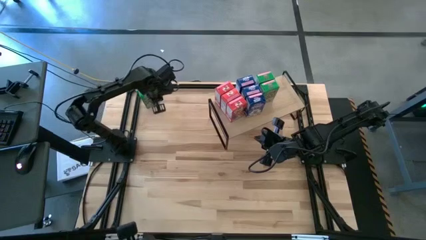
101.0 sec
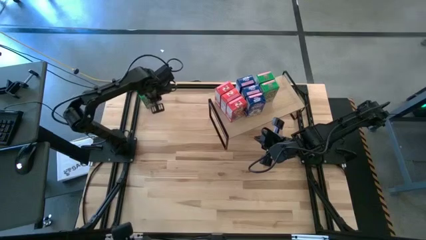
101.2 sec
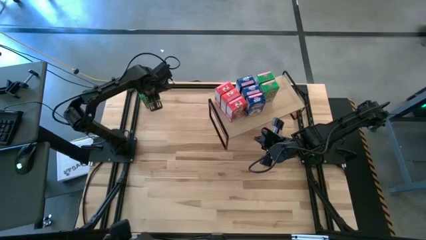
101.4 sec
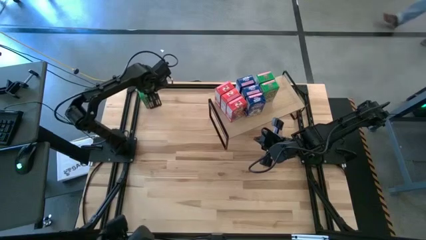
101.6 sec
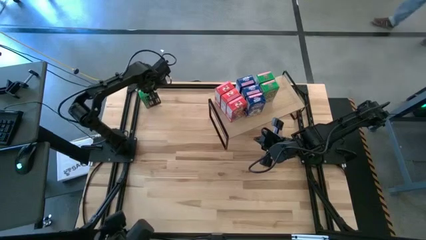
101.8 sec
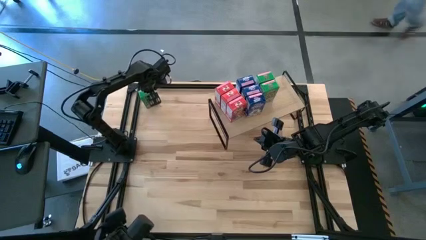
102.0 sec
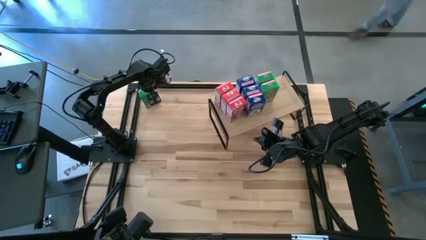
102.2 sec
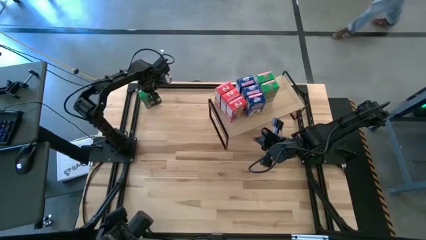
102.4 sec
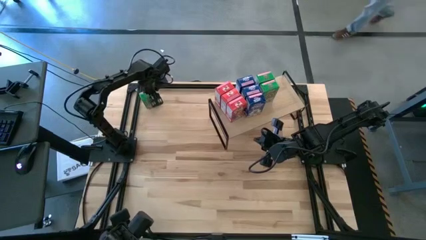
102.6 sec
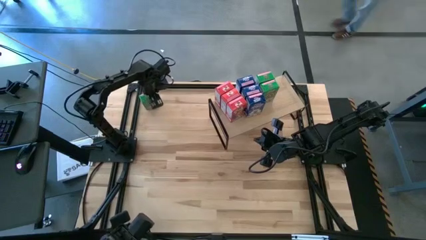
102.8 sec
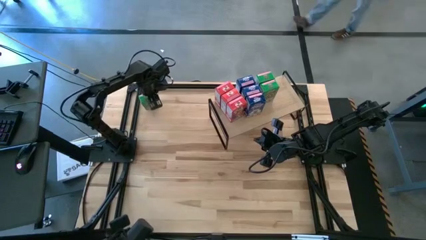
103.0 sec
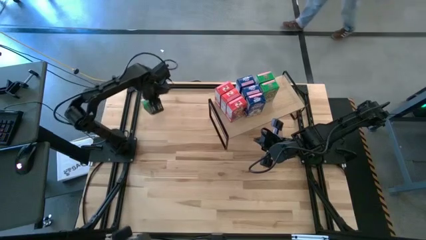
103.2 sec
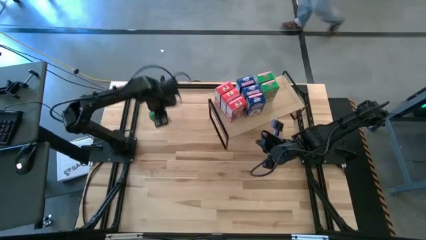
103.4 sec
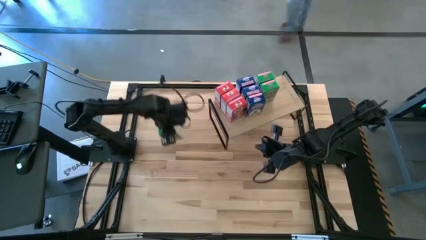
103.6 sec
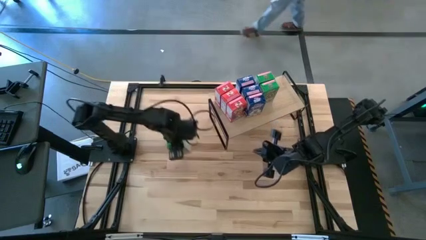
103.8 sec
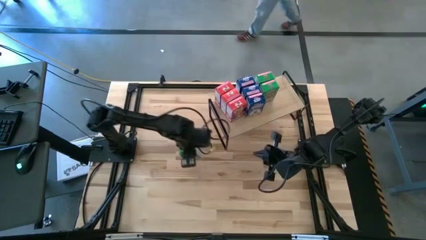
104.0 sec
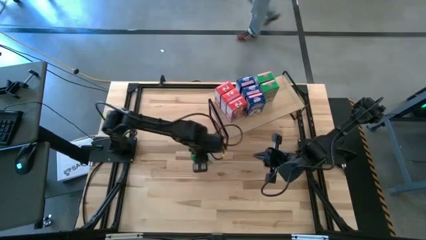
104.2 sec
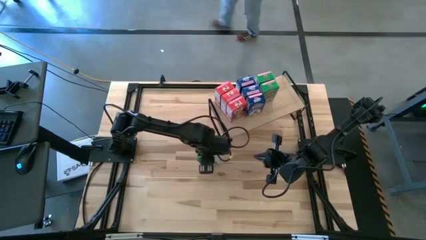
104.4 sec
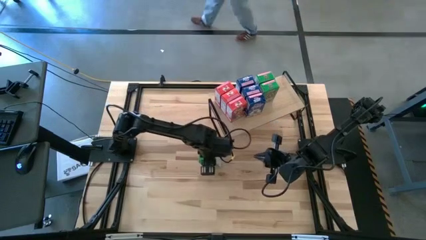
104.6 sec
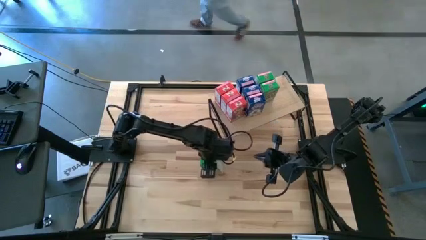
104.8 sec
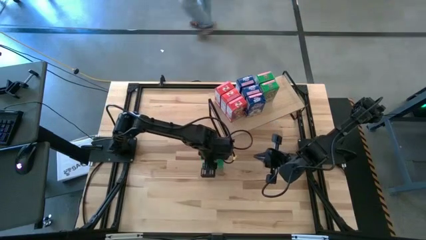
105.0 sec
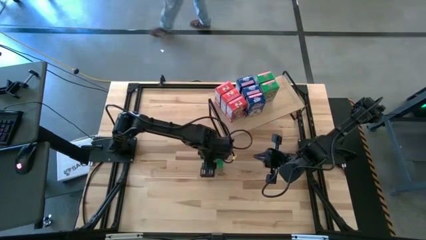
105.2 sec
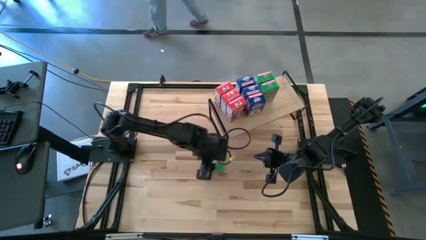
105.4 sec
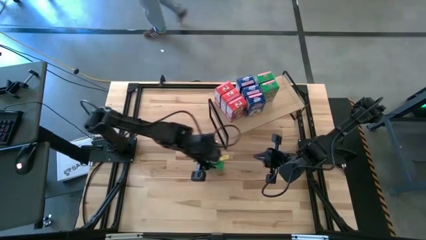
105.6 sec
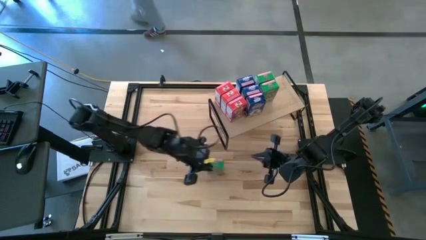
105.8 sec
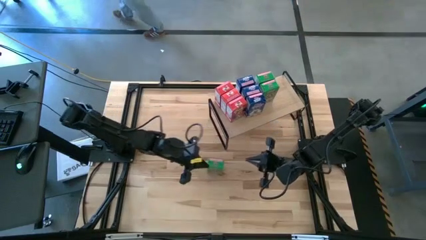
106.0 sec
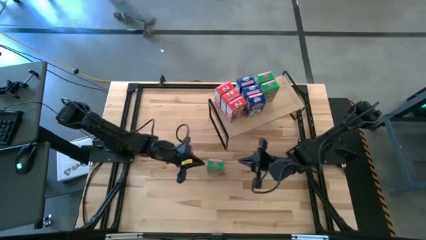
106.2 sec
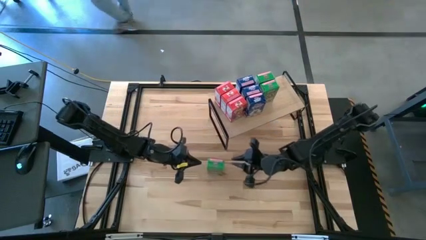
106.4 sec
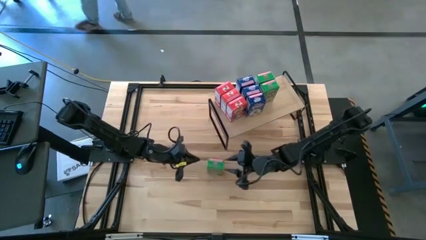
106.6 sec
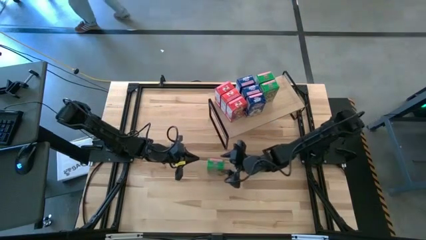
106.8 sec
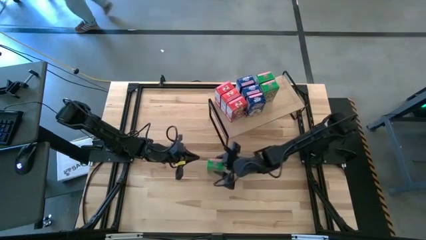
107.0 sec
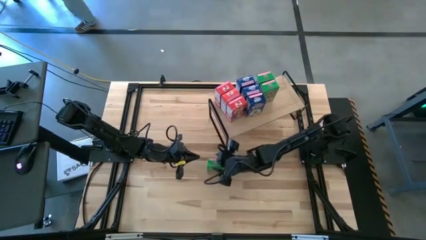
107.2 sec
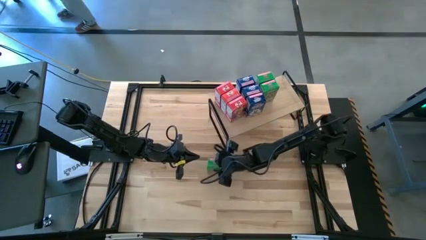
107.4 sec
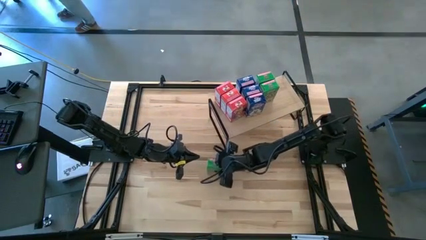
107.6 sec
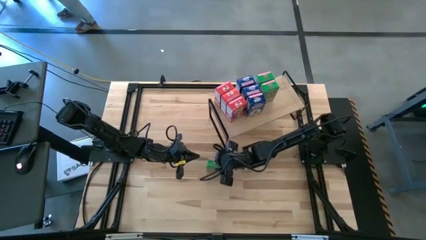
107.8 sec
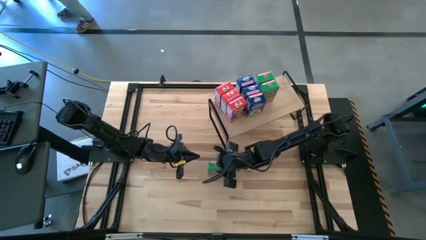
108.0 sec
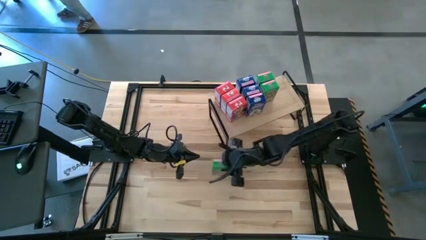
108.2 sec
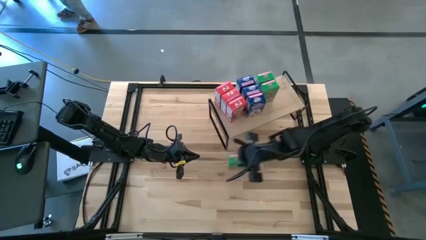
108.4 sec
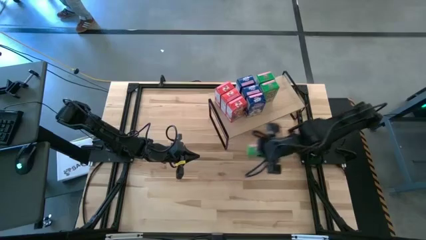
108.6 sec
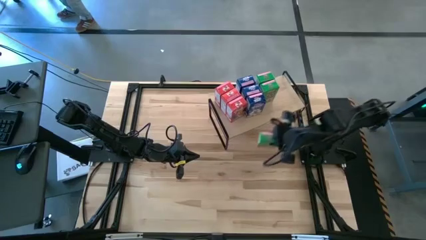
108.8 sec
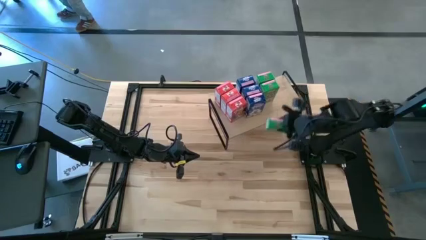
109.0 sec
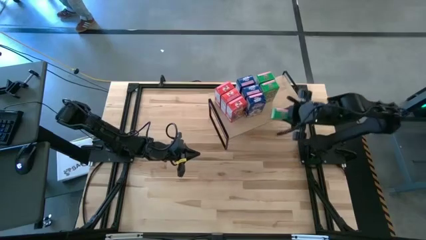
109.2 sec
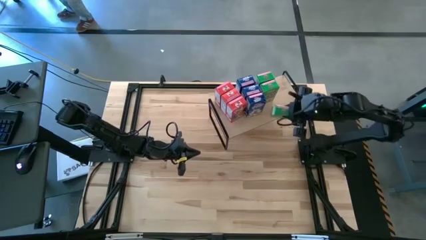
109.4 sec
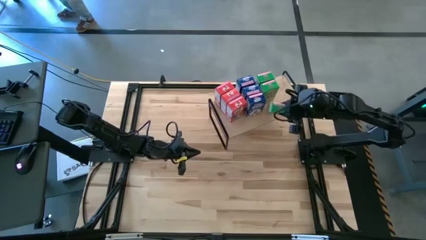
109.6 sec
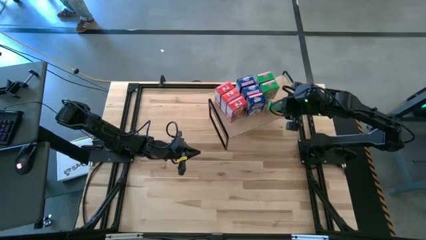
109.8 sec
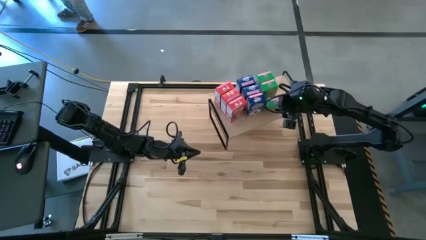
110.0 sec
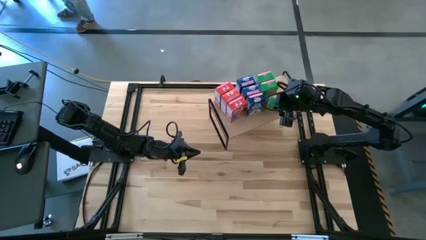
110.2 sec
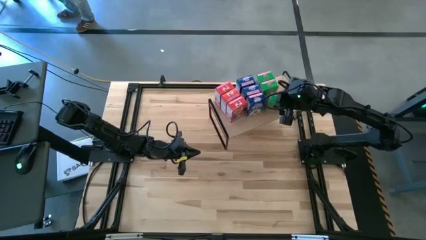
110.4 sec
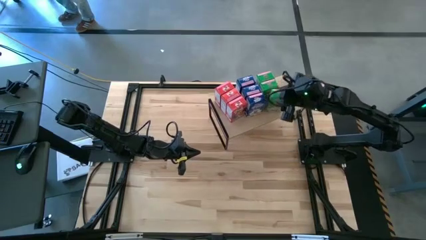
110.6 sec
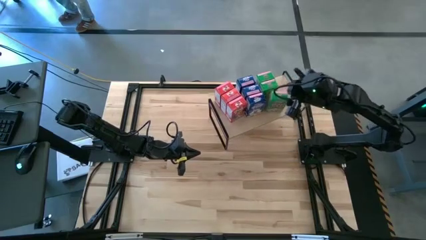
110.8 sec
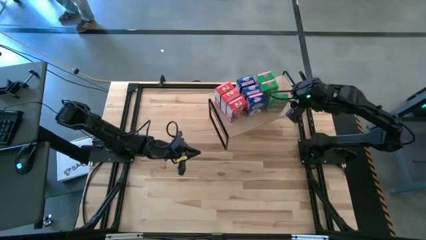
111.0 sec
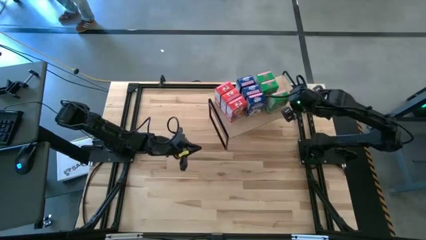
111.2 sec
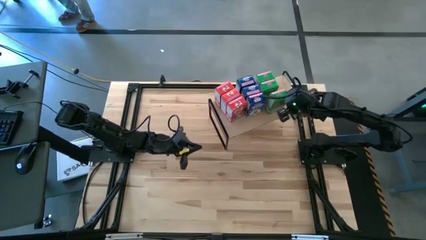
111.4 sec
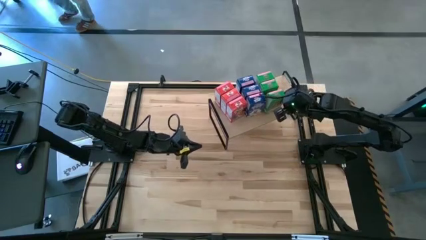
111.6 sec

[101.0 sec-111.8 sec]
Task: Stack cereal on shelf
Put the green cereal box on the shelf aligned with the green cereal box

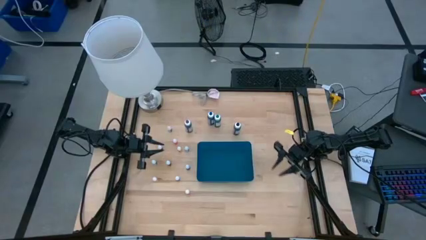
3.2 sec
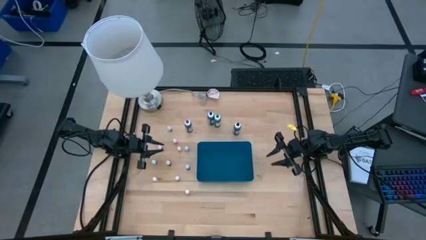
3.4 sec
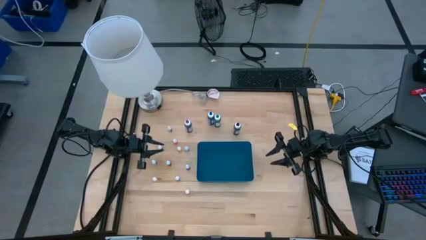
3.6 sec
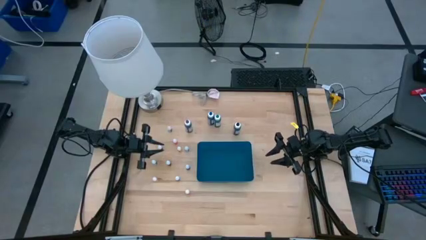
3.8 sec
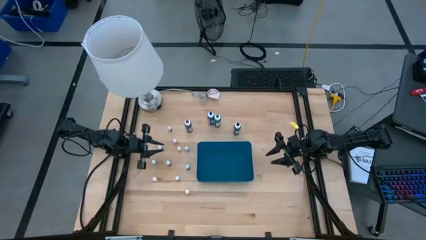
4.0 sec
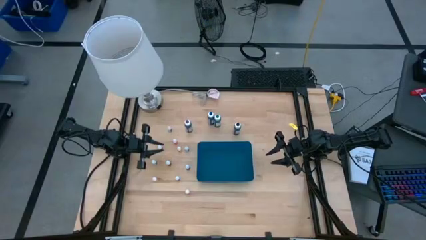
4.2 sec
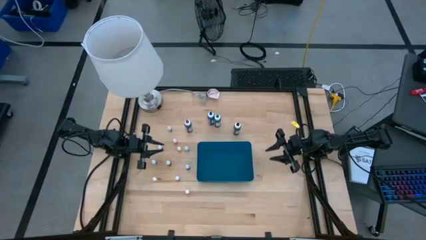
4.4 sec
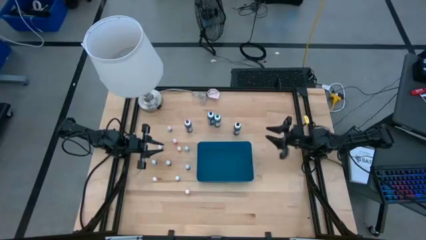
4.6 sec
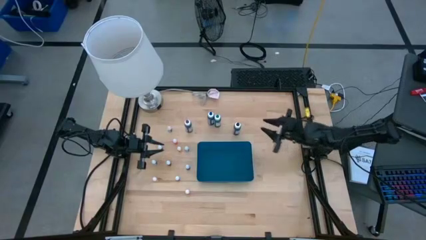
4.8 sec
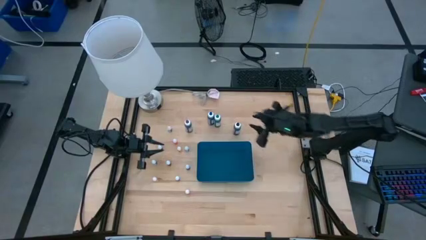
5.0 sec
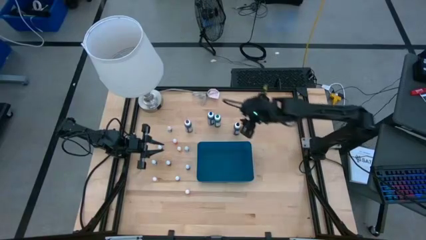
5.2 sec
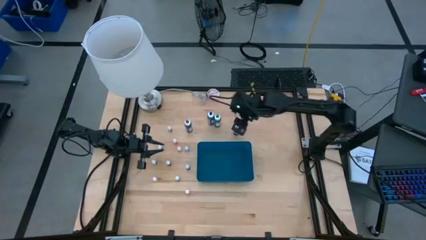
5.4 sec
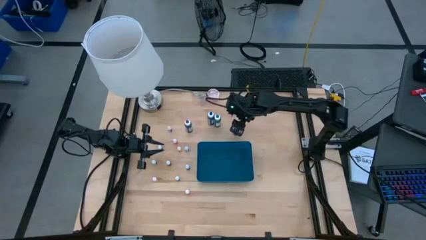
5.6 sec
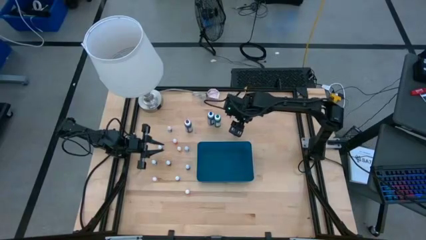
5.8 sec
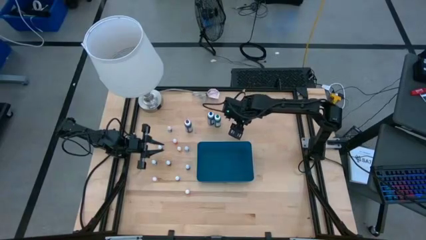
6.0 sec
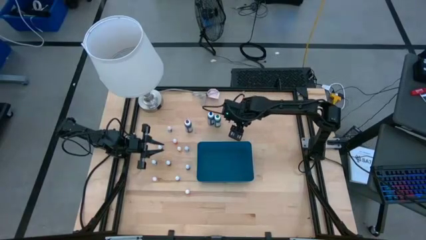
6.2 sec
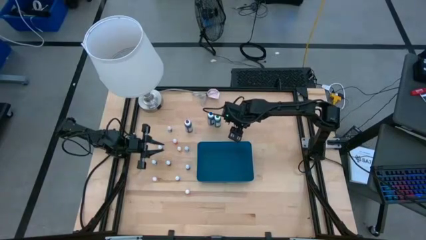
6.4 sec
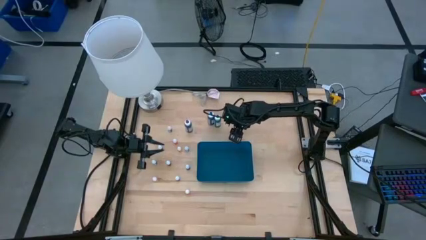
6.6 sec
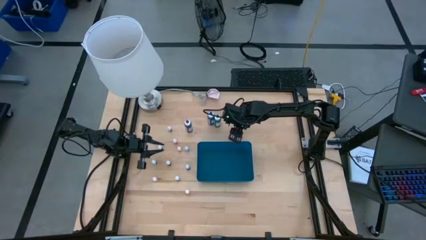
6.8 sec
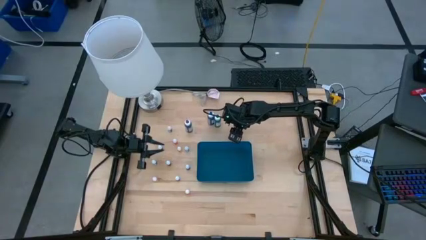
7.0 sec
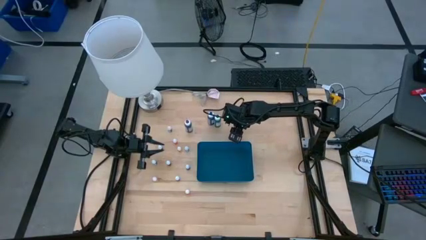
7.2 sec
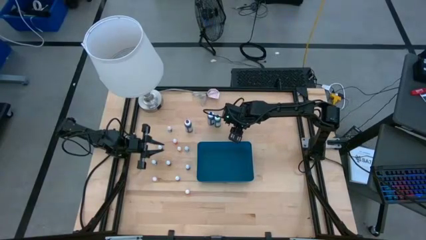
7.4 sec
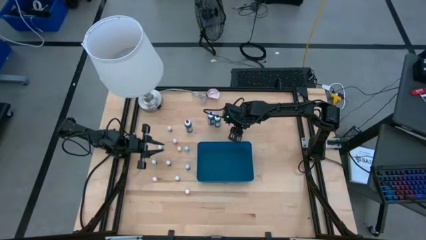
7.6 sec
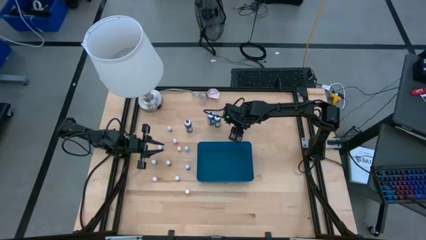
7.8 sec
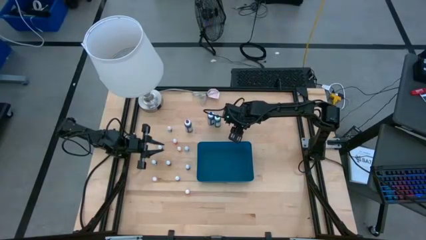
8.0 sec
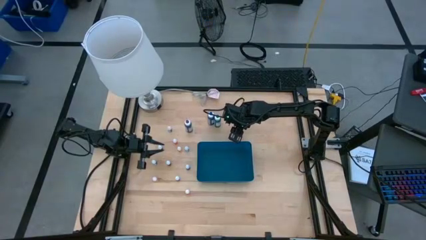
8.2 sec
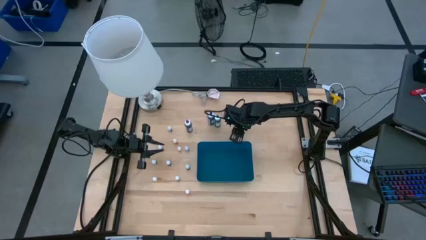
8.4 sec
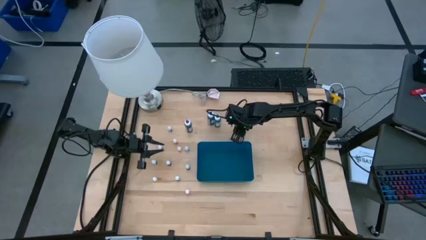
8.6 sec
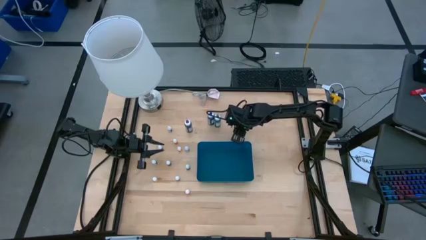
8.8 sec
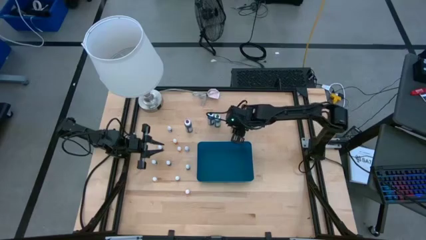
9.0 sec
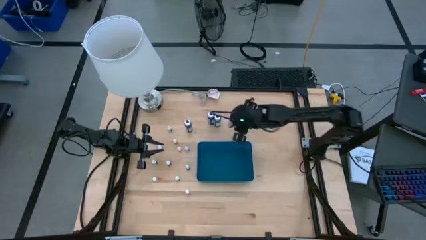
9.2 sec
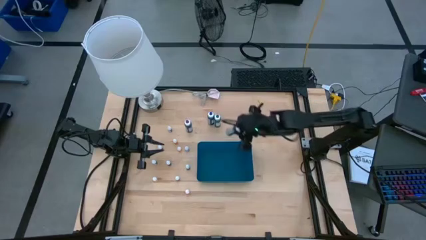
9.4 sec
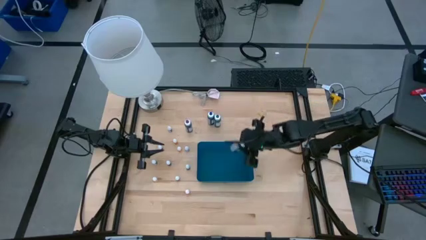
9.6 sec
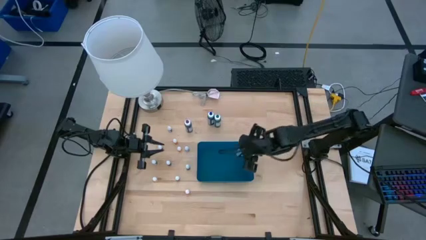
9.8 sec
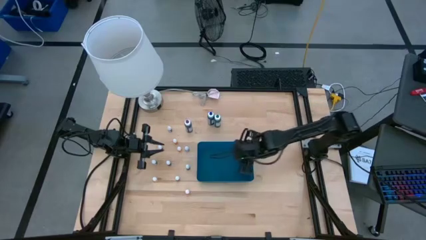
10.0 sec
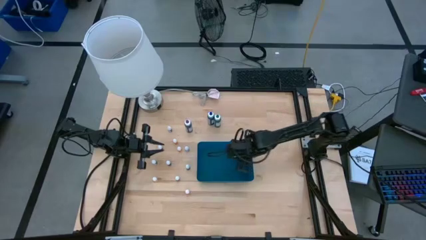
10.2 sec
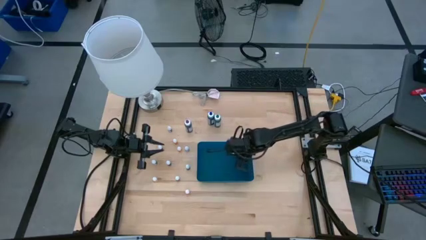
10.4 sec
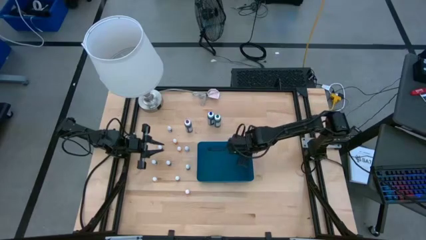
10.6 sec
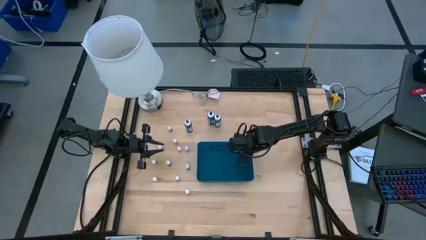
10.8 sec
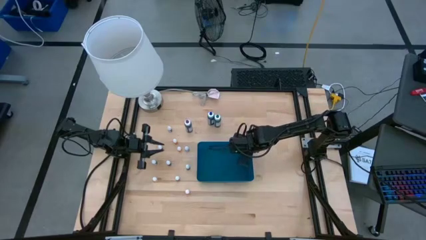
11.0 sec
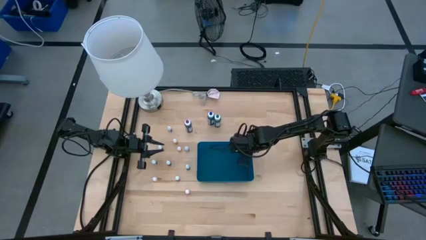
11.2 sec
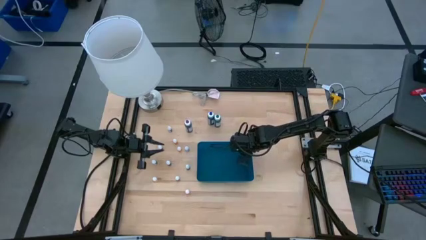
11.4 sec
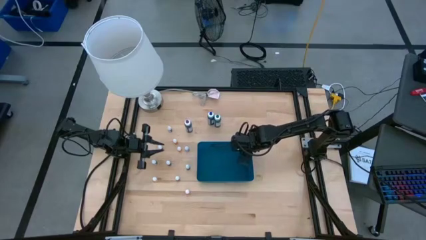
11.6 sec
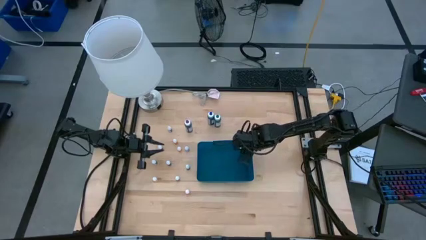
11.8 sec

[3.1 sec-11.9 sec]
Task: Pick & Place food coloring
Put the large black food coloring bottle into the blue bin
